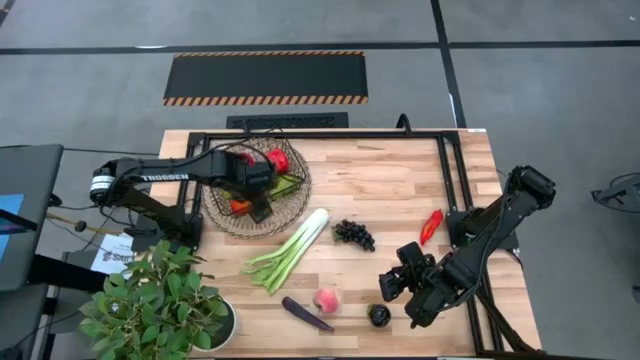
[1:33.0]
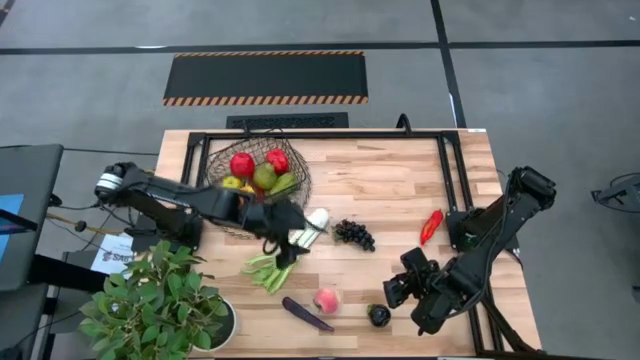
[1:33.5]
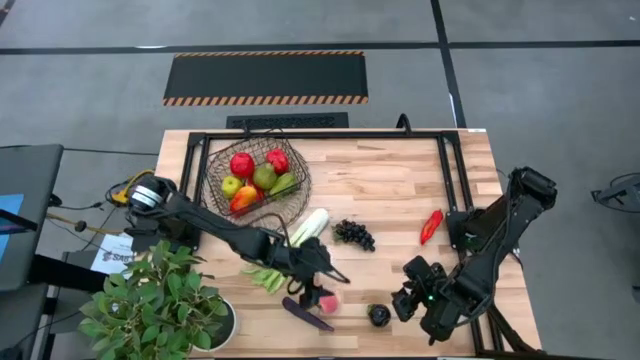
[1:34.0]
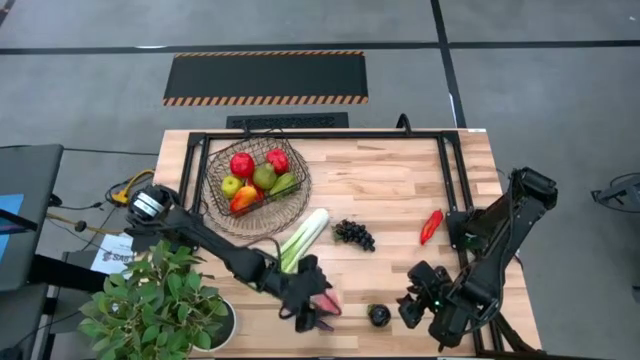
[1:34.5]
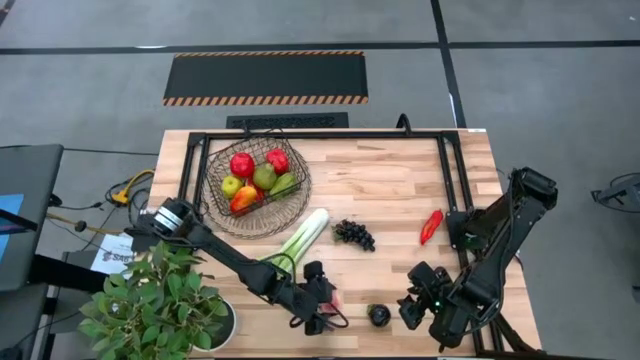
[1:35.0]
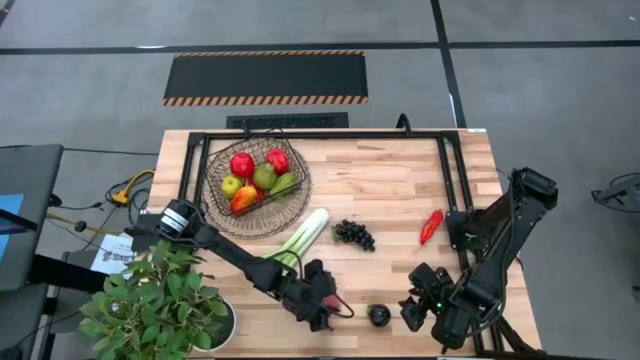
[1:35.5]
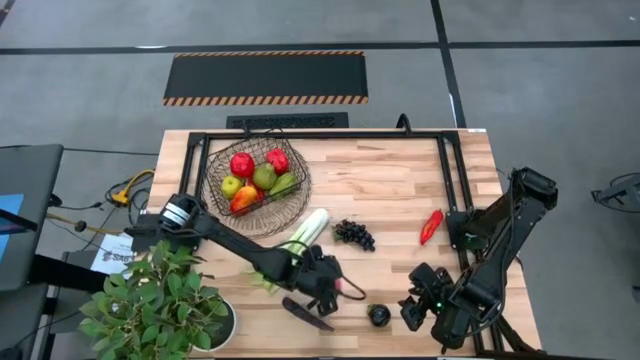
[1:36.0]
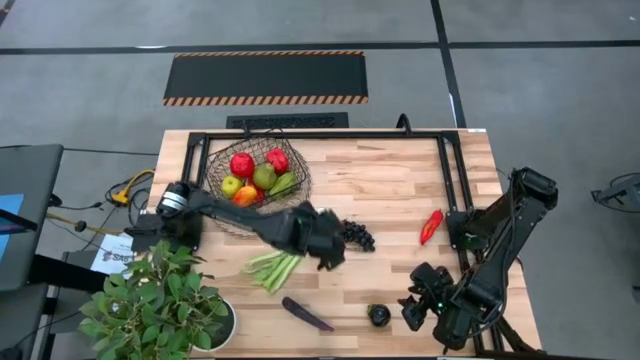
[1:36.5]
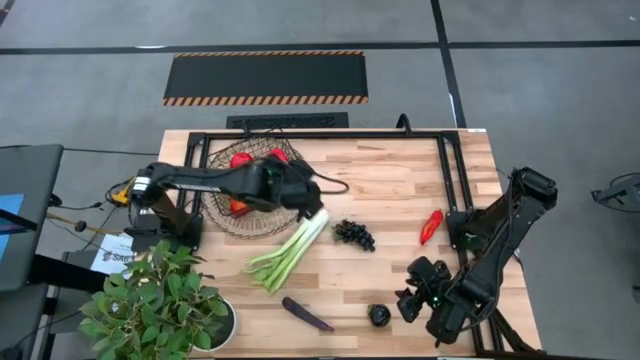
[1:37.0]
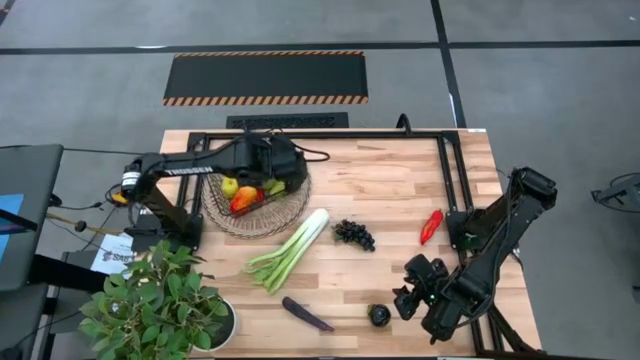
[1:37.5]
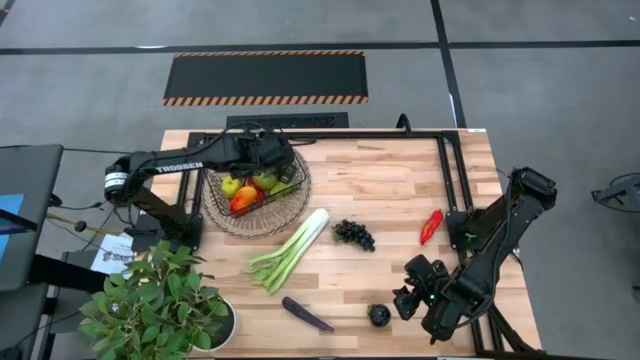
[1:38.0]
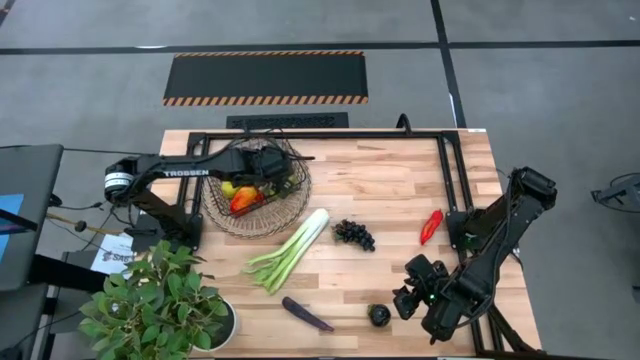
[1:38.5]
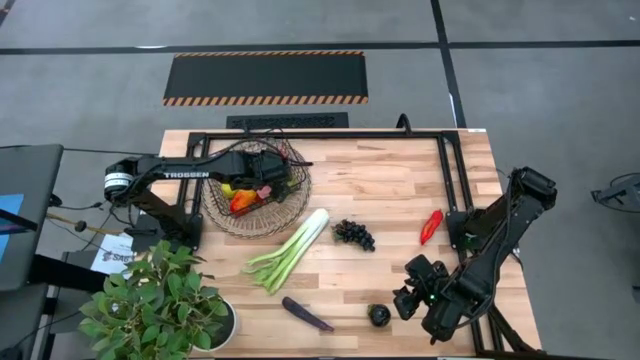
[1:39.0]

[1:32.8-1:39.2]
Task: Build produce basket
Put the pink peach into the wire basket

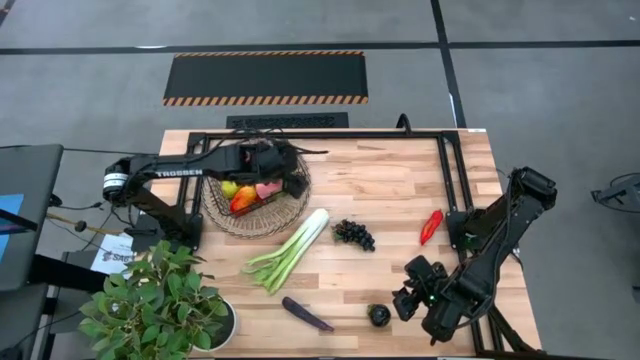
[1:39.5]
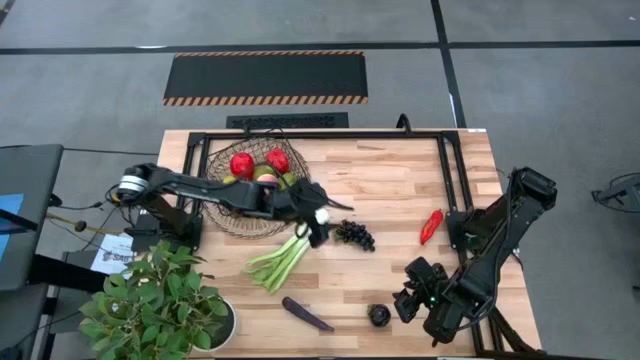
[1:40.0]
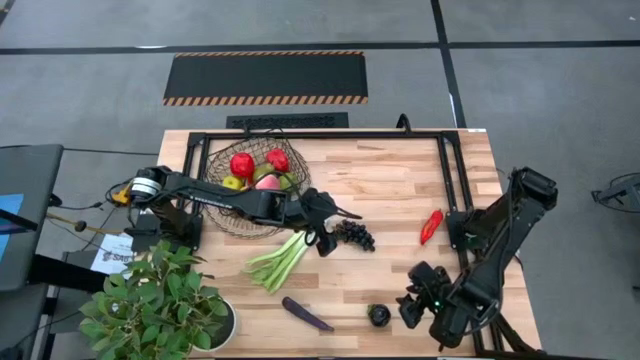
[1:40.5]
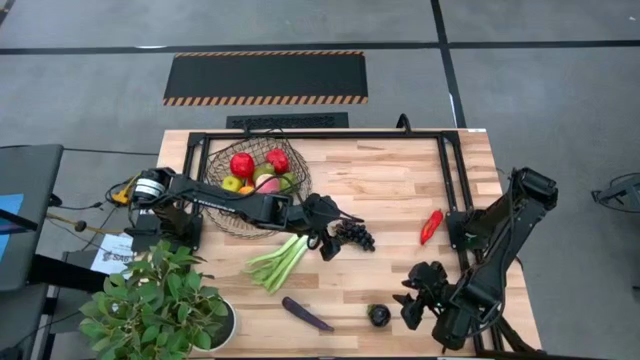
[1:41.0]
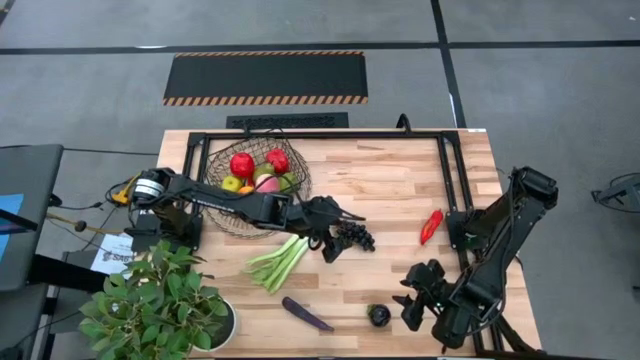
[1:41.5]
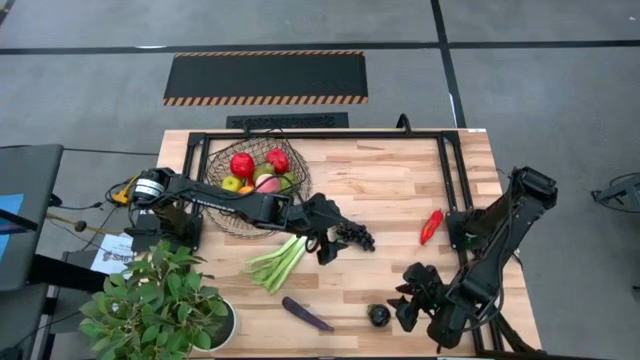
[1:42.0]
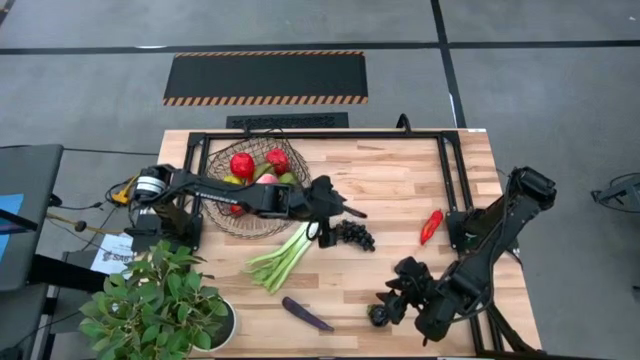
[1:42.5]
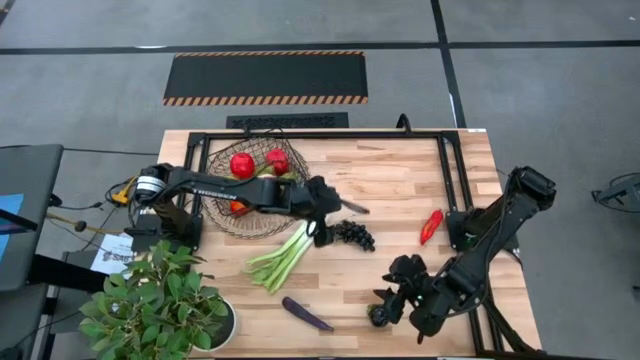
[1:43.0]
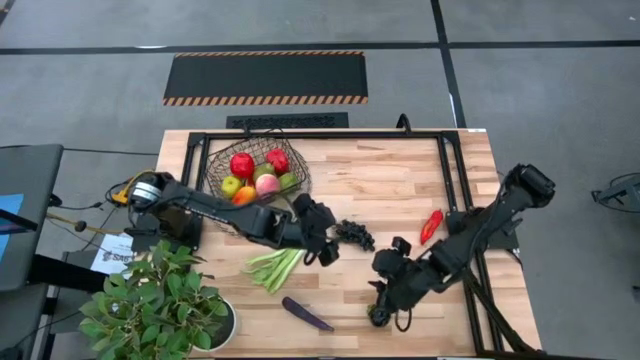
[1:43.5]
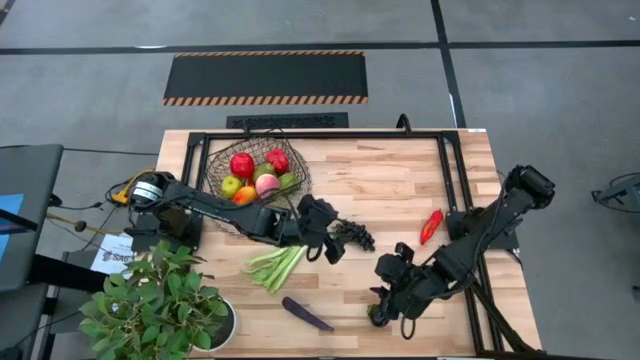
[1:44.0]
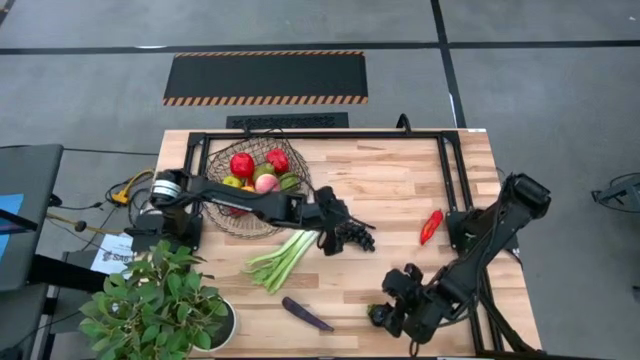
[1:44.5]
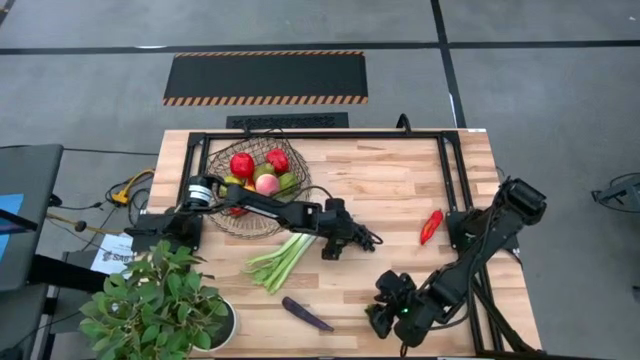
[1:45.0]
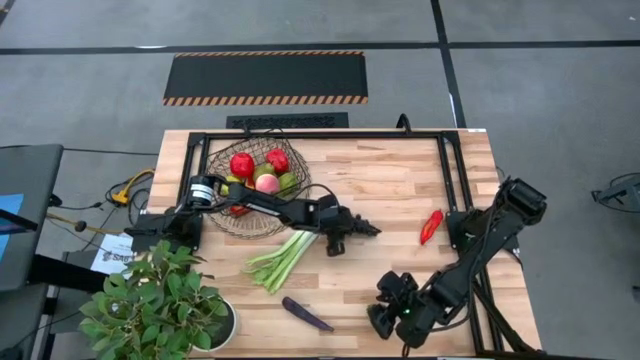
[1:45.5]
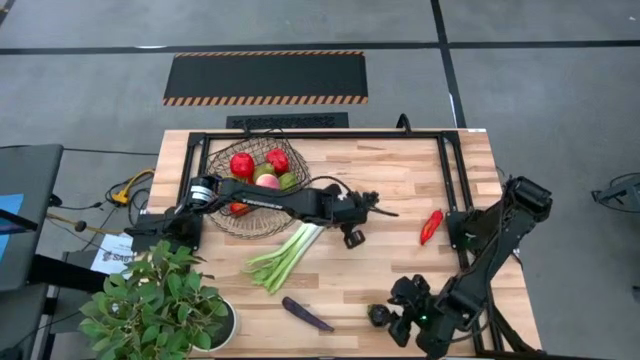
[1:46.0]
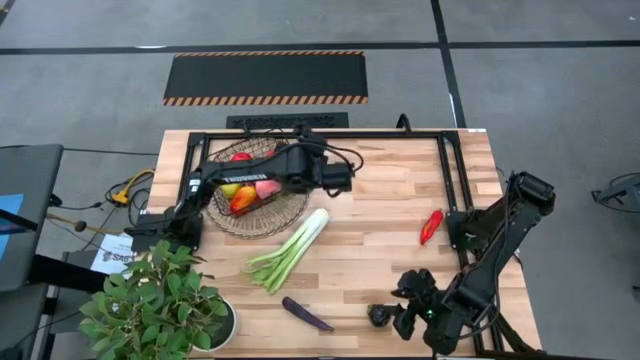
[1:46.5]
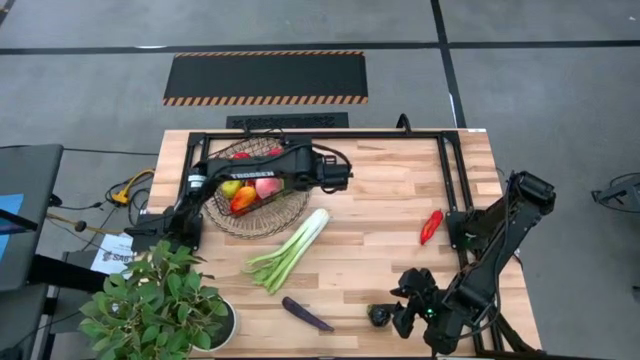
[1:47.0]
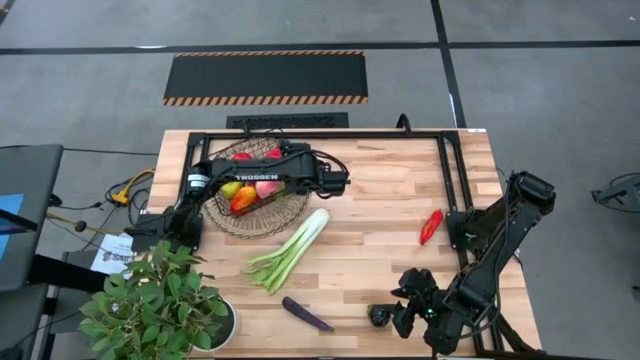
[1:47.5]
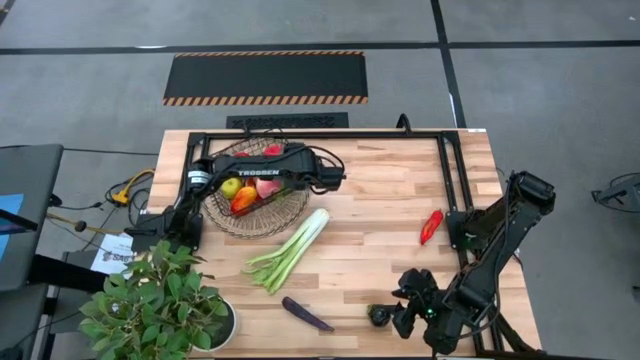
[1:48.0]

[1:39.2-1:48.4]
Put the black grapes into the wire basket

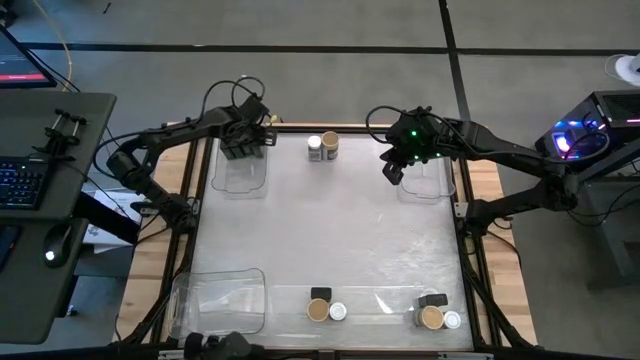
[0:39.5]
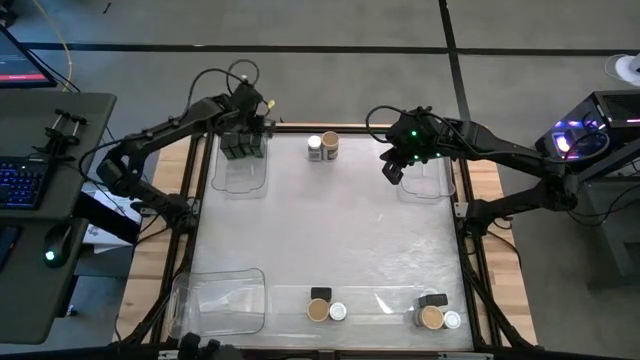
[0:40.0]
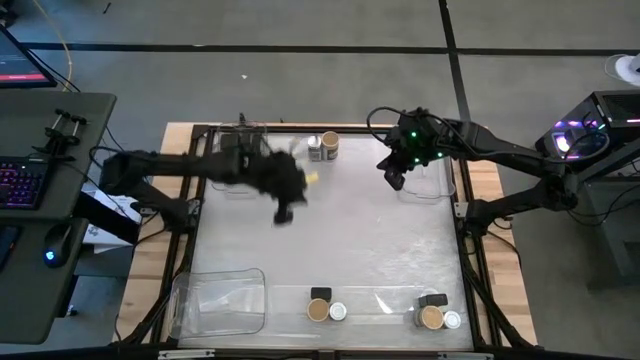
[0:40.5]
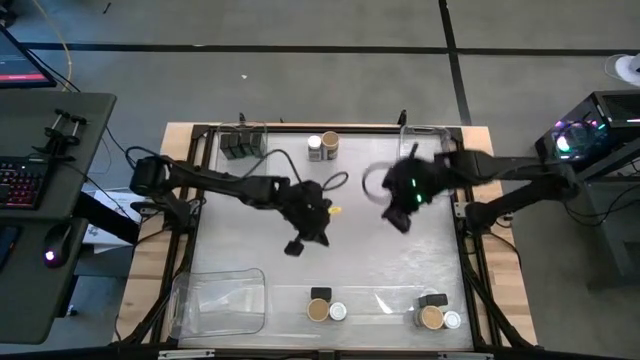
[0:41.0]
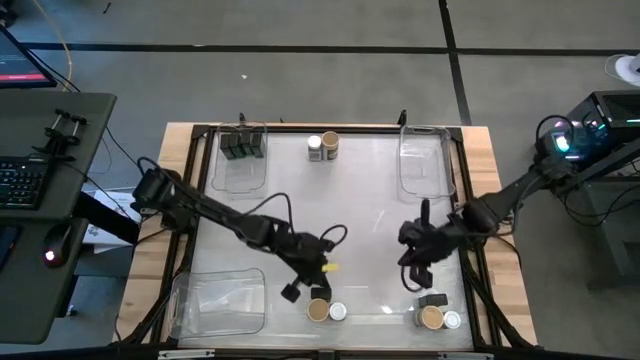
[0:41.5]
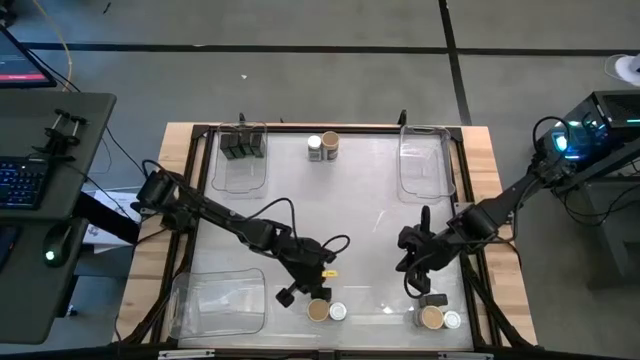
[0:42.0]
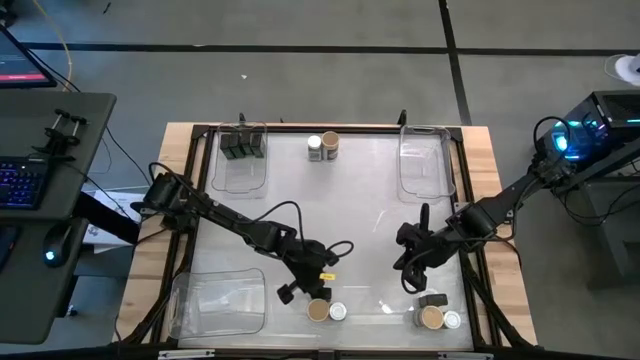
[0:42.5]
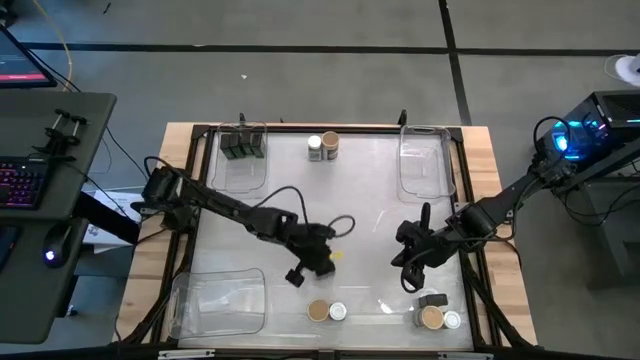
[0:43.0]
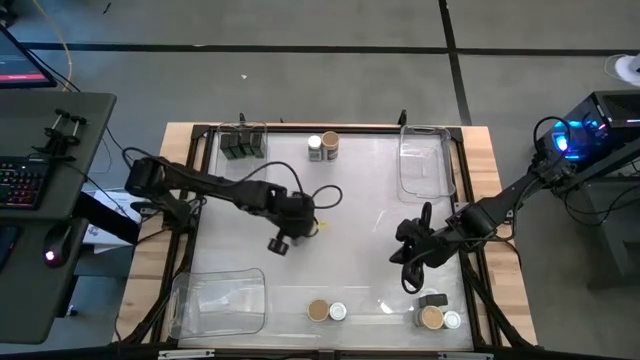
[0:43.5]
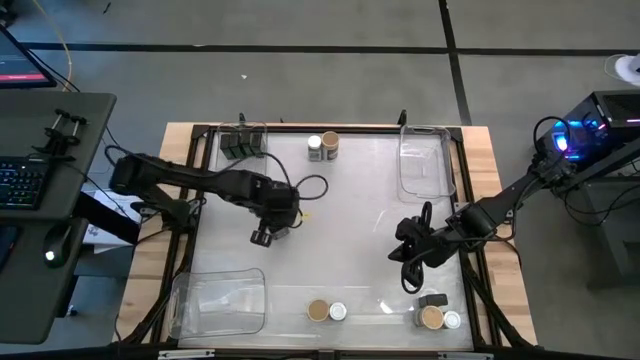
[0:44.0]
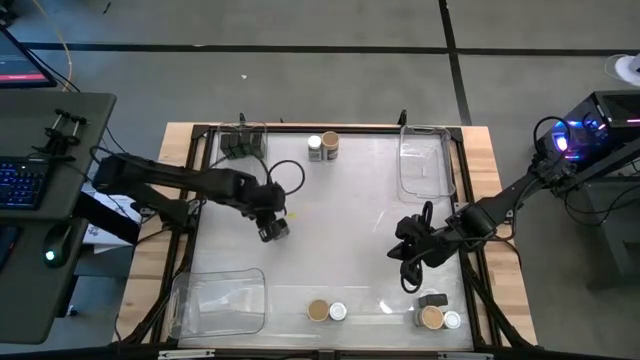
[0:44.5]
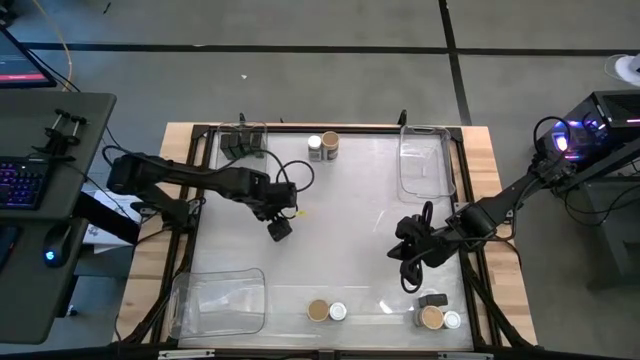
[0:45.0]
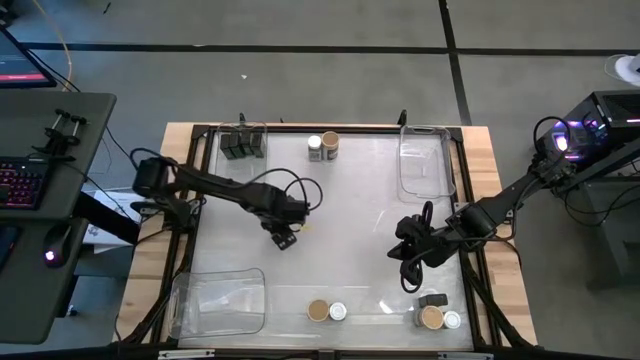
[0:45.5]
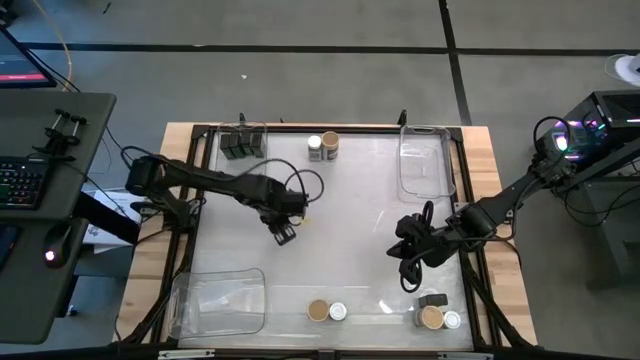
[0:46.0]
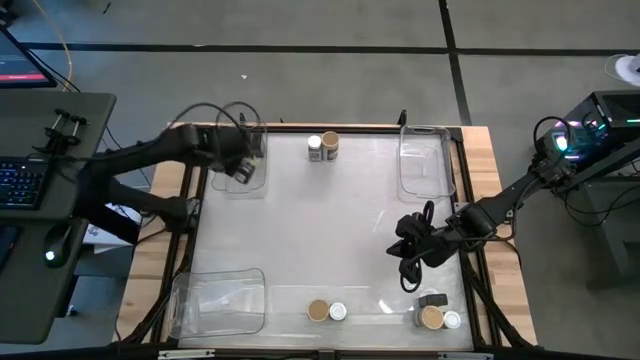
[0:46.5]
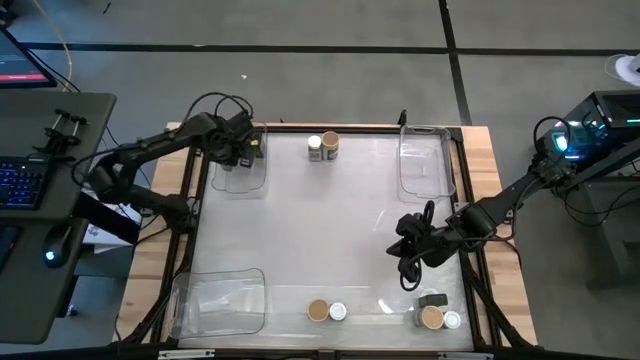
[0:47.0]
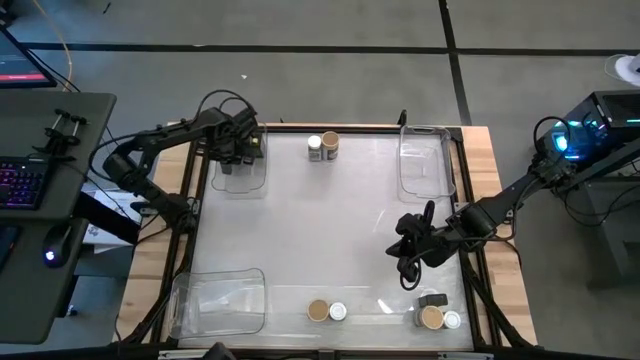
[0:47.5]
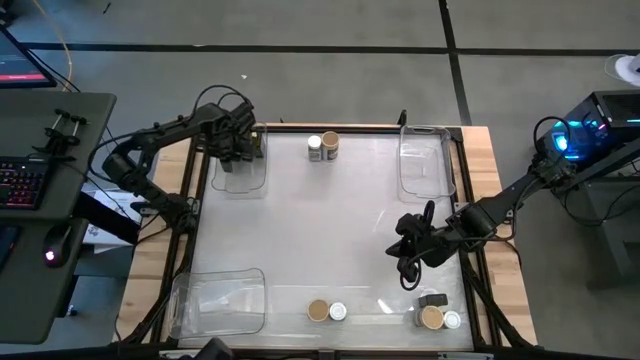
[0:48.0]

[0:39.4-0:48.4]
Task: Sort spices by type
Put the black seasoning can into the top left transparent bin
